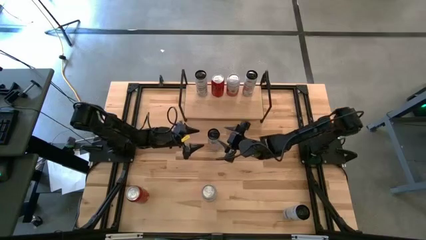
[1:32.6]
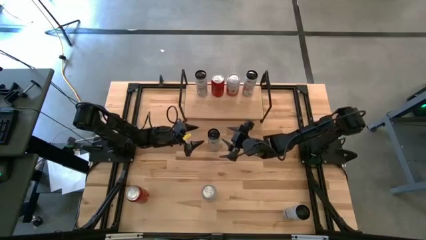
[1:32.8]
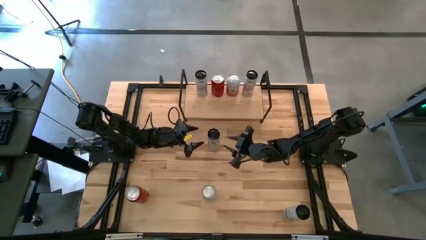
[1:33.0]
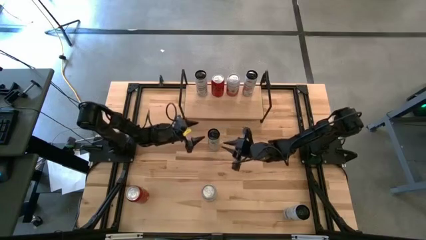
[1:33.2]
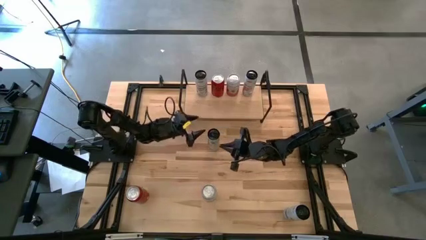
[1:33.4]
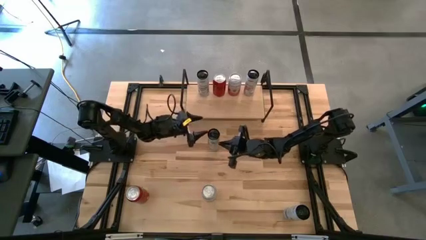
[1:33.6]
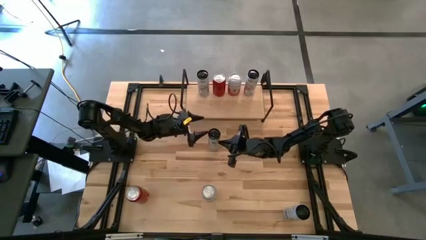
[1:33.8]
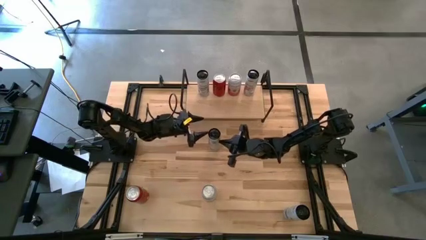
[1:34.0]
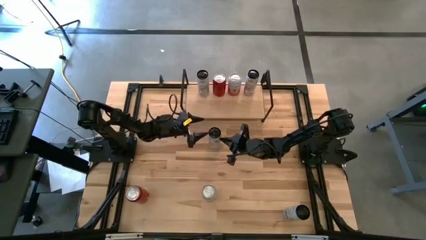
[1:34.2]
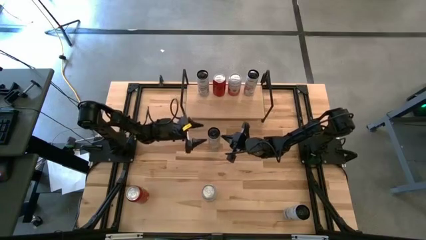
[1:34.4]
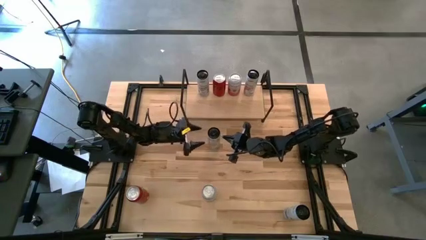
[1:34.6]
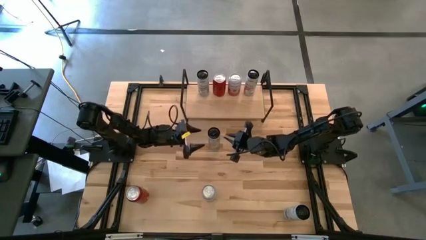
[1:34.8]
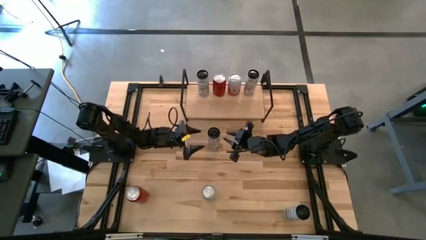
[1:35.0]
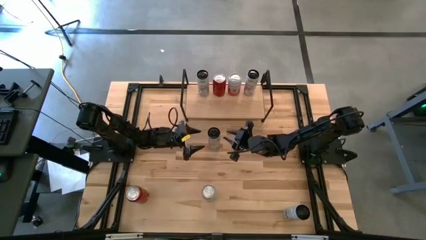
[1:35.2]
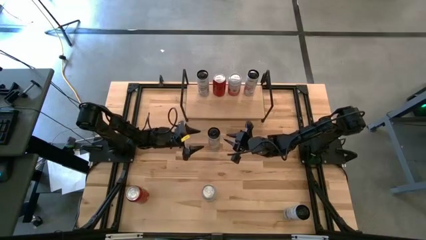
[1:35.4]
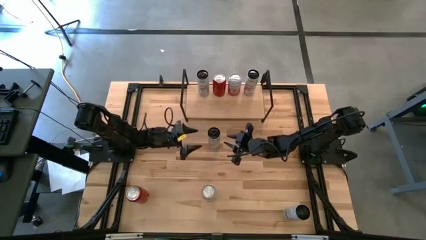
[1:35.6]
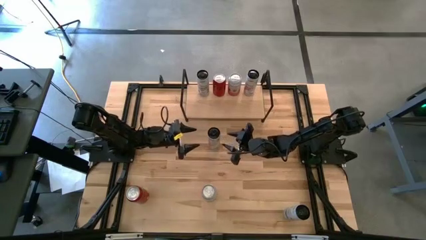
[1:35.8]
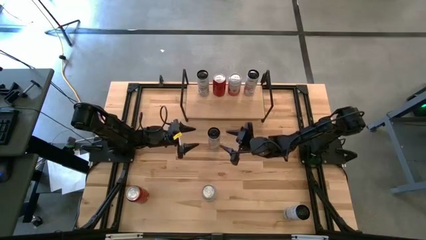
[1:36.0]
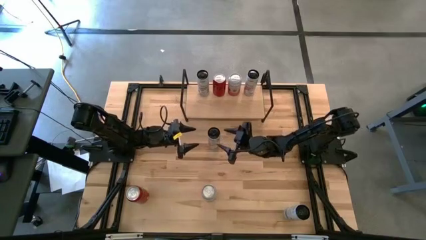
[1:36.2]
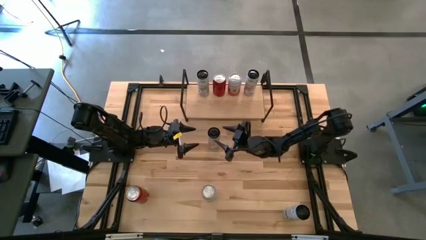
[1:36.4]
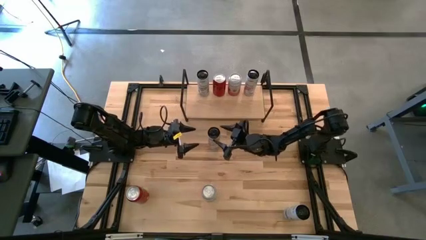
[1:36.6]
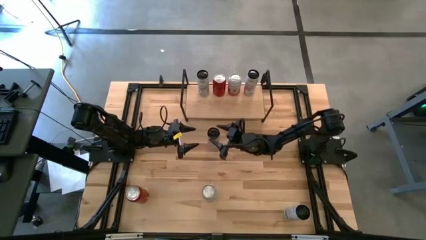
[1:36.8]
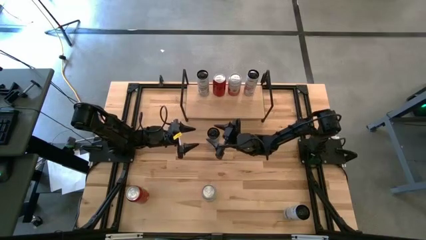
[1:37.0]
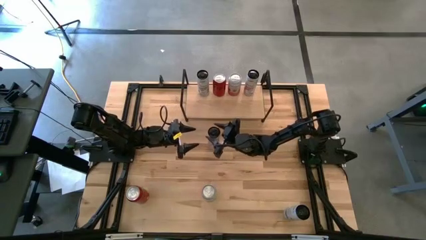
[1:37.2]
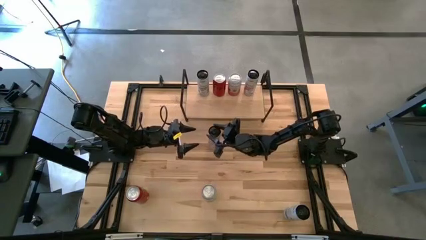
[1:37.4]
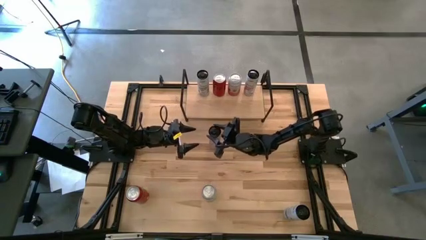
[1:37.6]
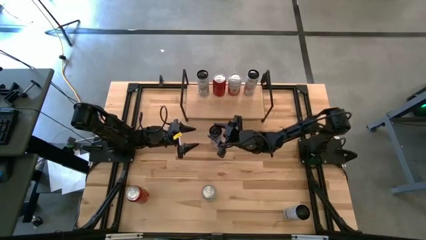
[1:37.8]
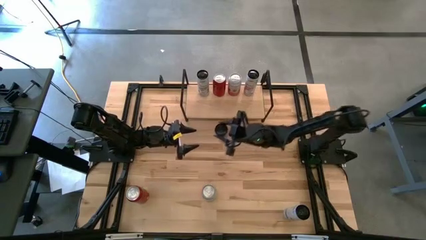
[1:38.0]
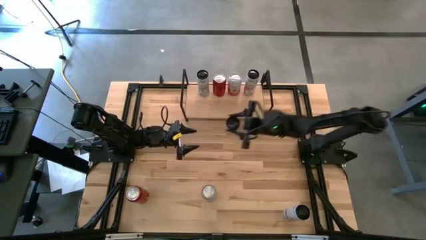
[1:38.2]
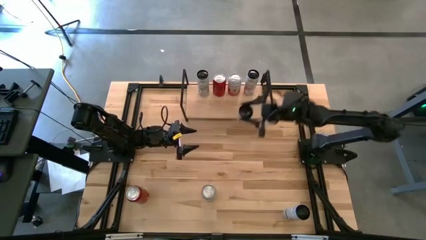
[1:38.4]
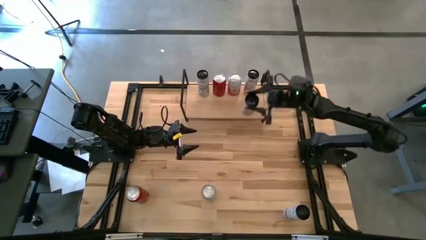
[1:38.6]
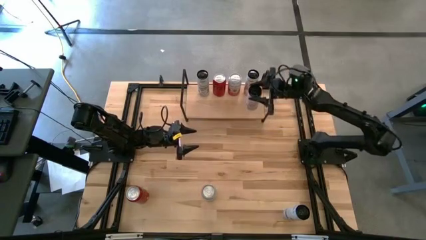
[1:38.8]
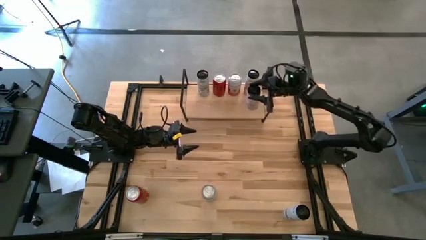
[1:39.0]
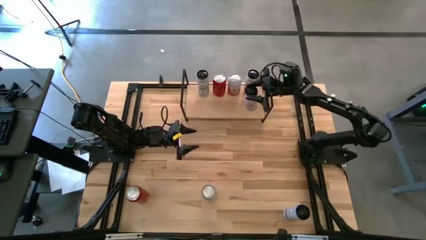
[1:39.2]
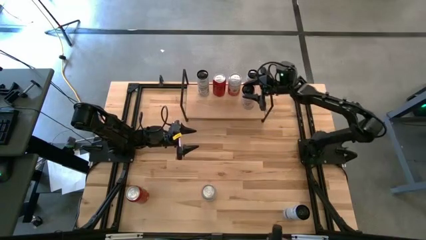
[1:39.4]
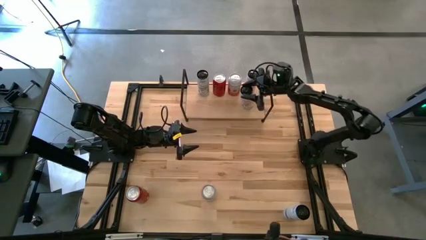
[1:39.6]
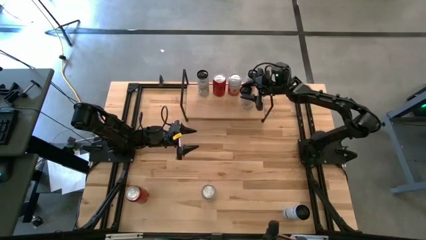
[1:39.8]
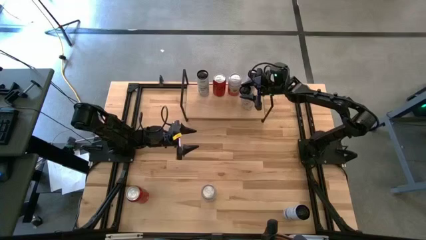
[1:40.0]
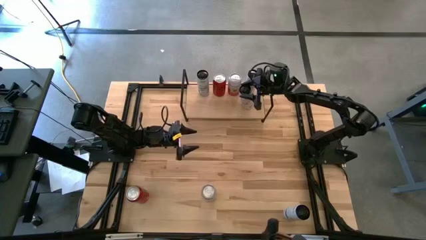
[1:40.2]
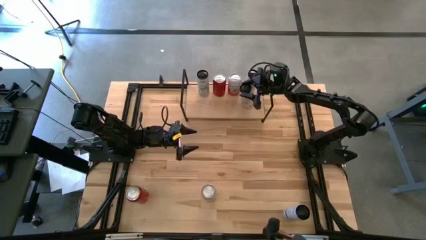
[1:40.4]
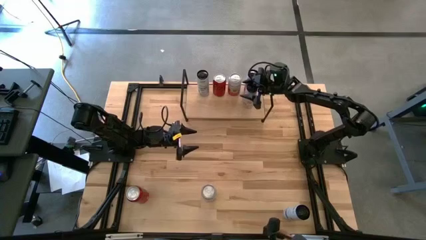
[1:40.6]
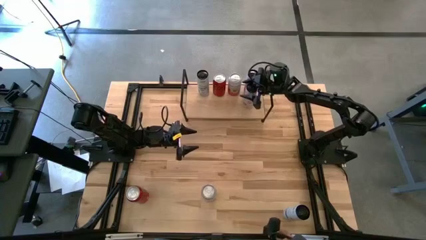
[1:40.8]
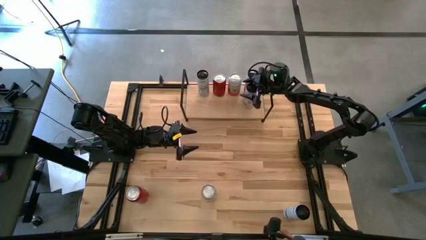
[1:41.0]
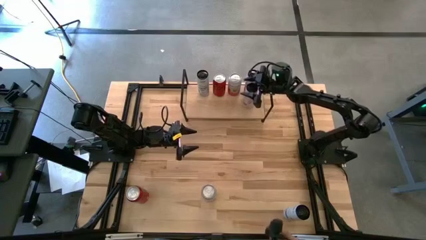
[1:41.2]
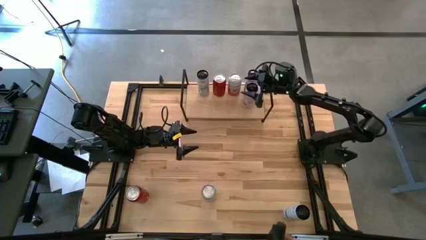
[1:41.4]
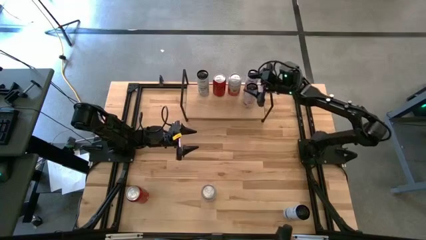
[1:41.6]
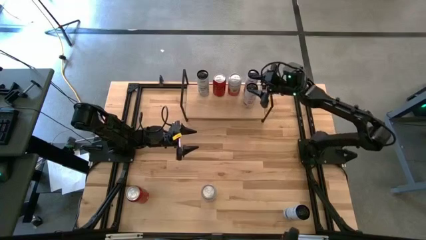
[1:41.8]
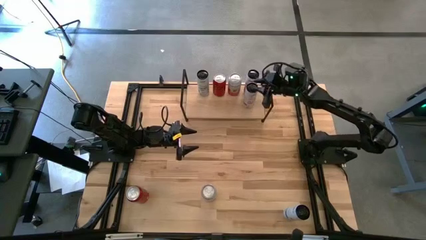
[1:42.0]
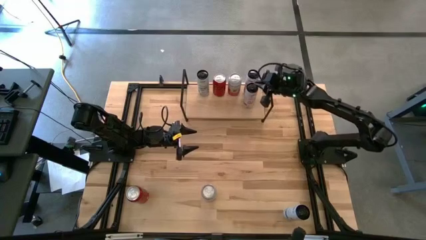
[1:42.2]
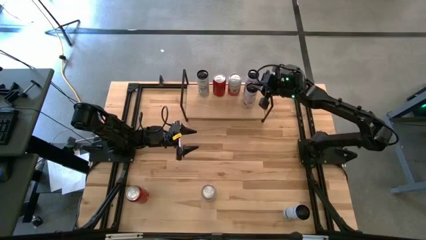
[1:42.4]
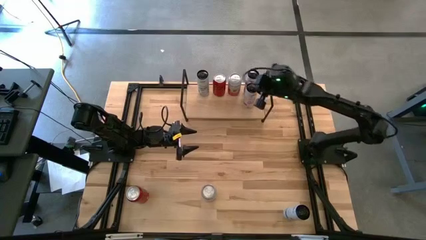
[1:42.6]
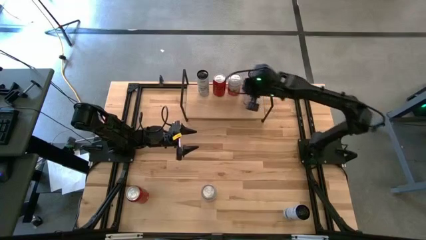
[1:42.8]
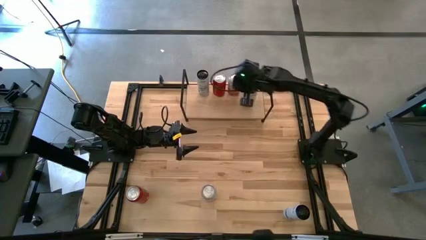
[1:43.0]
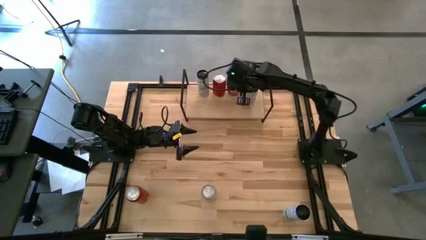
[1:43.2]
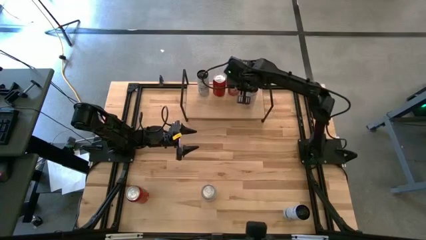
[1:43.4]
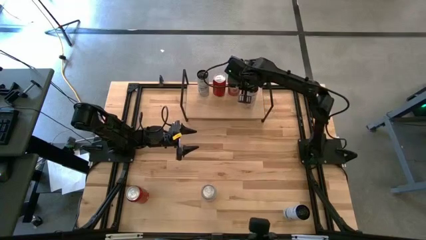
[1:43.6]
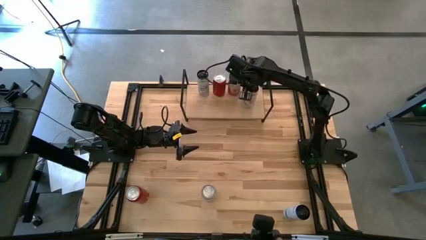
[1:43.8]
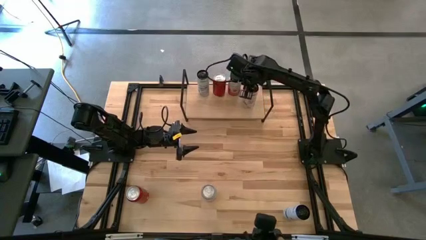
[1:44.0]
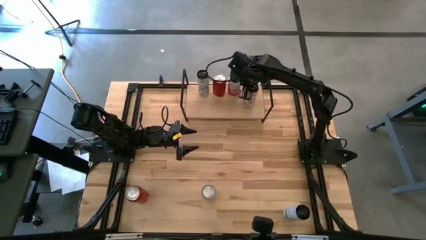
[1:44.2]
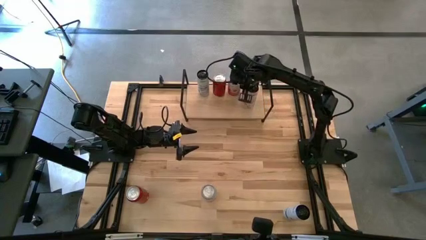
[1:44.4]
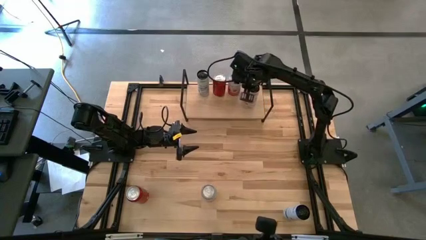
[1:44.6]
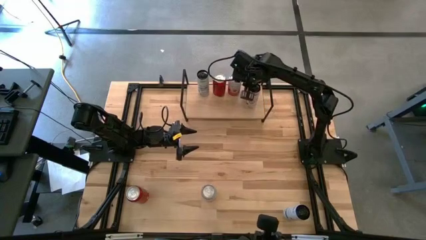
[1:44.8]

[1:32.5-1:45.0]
Task: Place canned beverage on shelf
Put the white and red soda can on the shelf aligned with the other white and red soda can

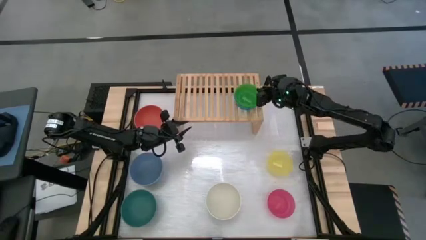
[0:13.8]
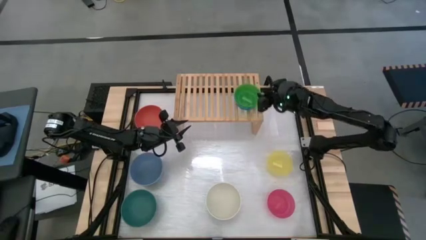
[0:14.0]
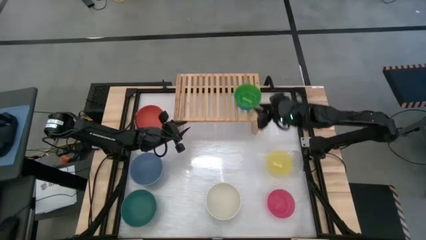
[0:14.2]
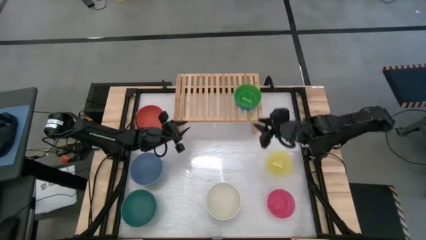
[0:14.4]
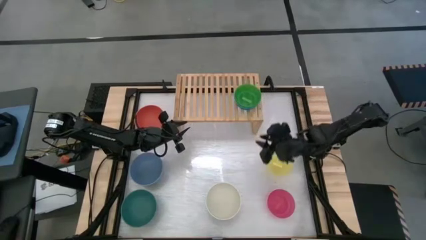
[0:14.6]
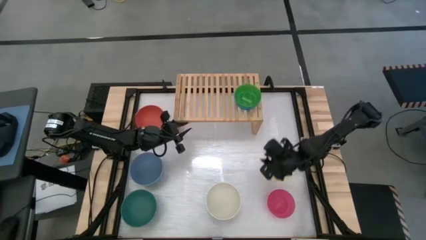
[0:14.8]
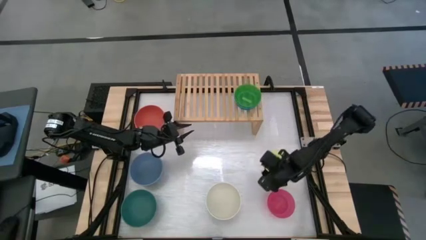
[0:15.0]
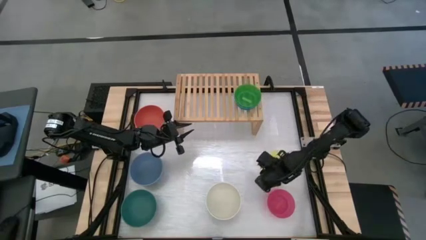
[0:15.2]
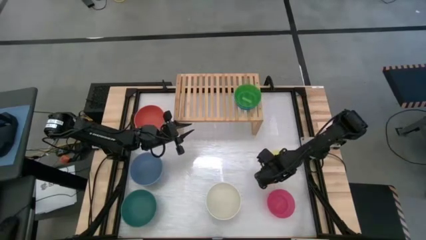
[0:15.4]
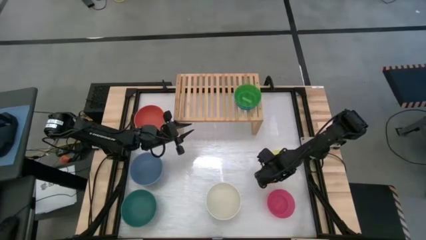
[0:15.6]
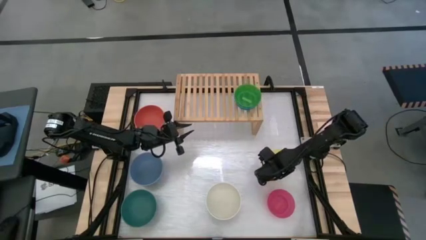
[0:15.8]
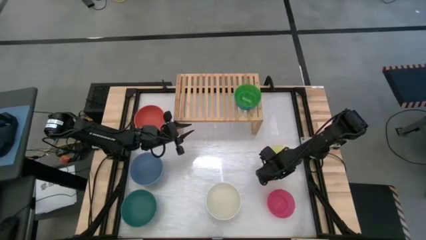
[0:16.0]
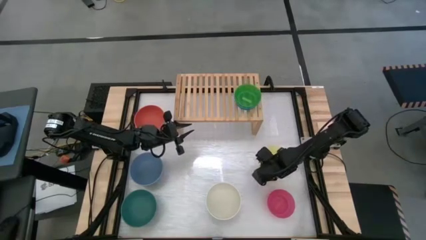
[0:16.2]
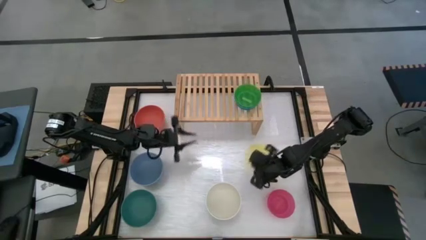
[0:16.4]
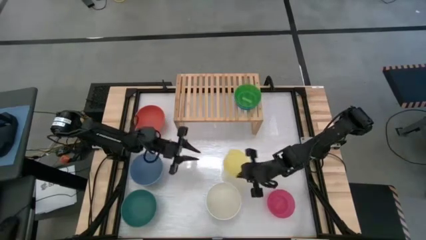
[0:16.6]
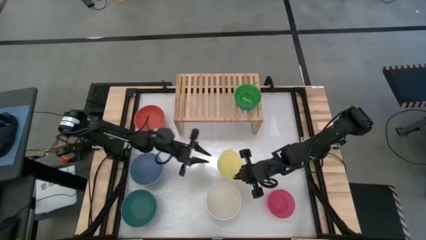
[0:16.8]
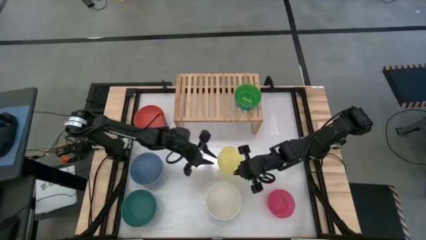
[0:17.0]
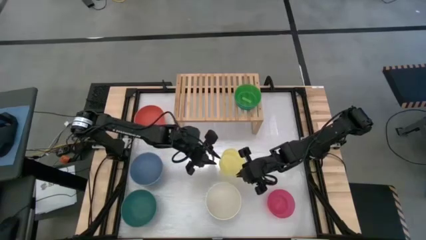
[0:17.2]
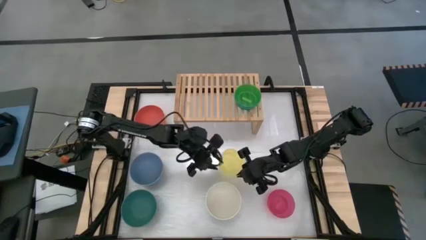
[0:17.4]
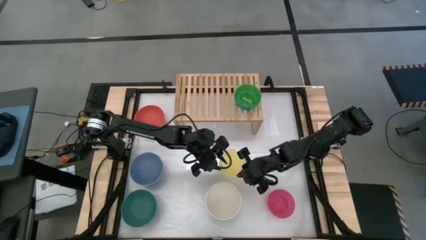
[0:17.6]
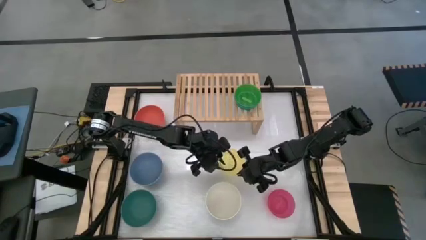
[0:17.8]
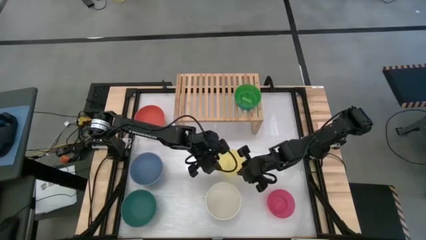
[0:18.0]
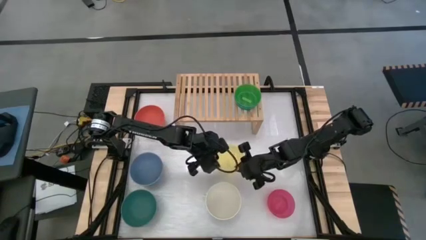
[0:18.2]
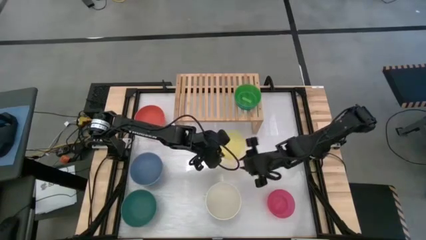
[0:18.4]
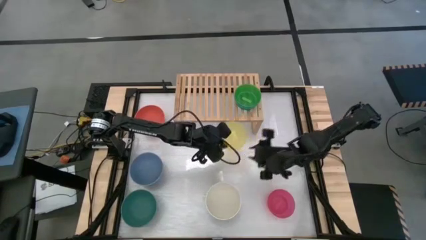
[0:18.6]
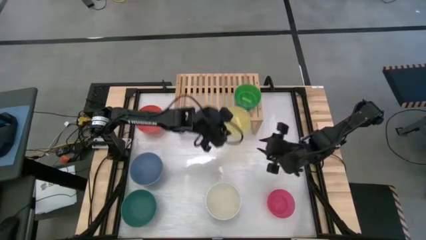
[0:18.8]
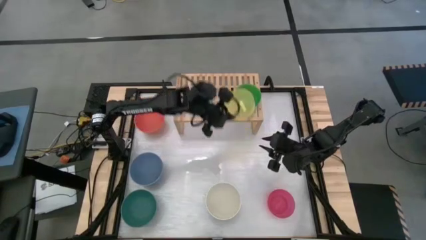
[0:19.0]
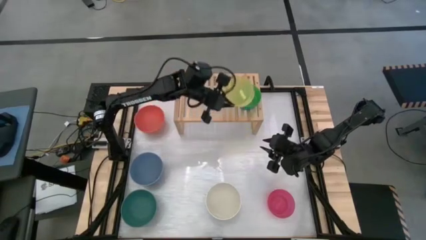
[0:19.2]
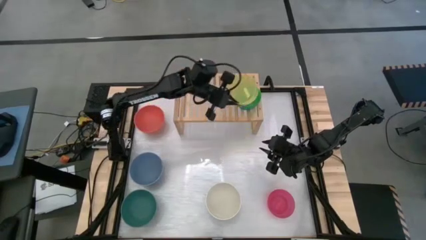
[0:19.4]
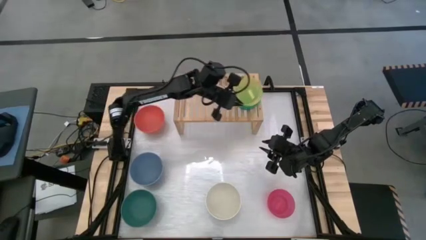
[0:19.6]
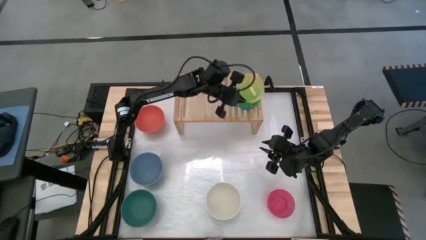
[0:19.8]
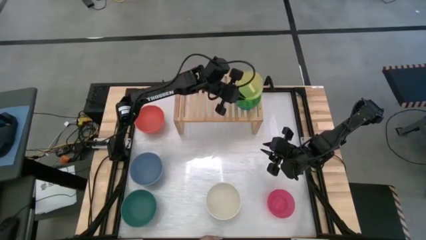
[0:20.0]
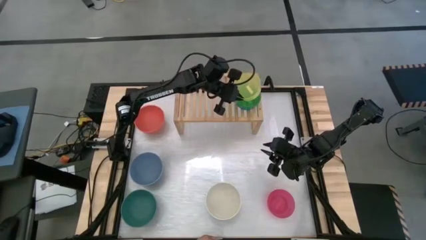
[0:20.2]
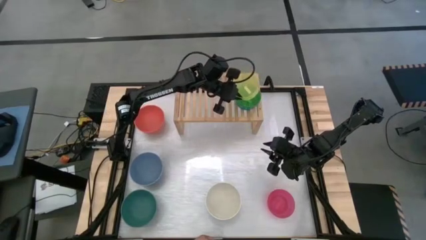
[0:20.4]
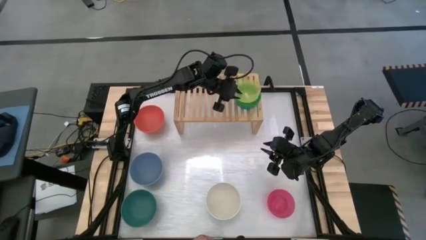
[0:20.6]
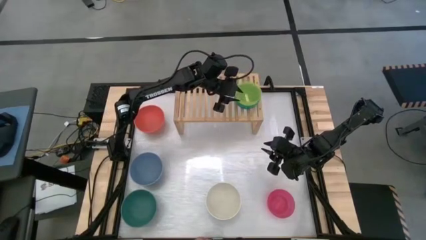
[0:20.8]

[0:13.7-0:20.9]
Task: Place and stack bowls onto a shelf
Stack the yellow transparent bowl on top of the green transparent bowl
